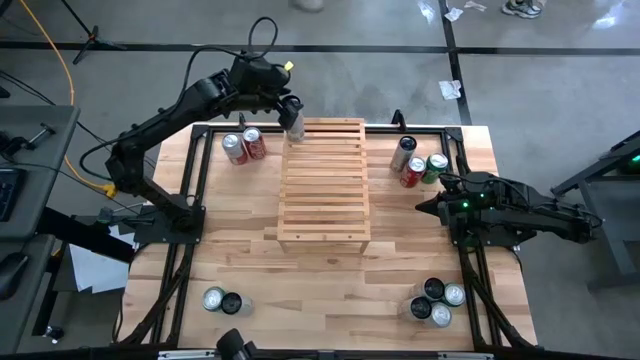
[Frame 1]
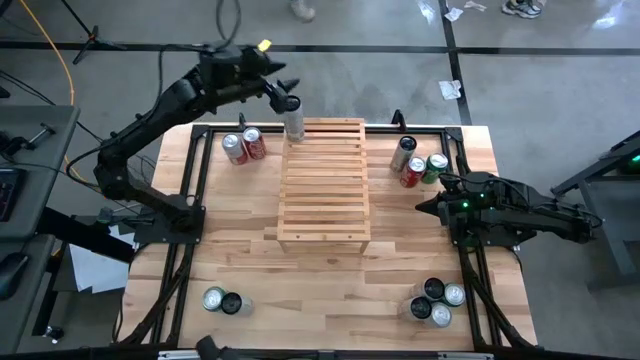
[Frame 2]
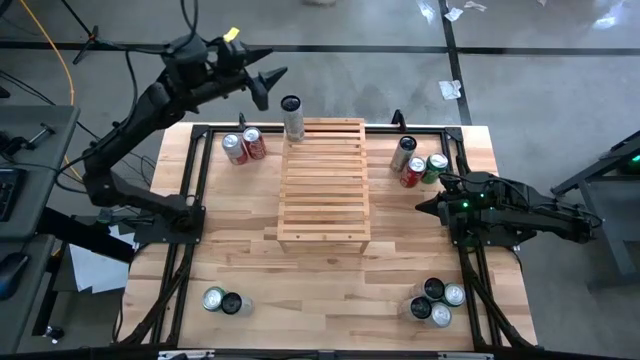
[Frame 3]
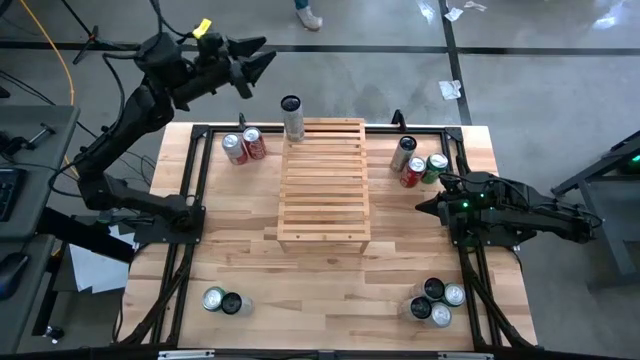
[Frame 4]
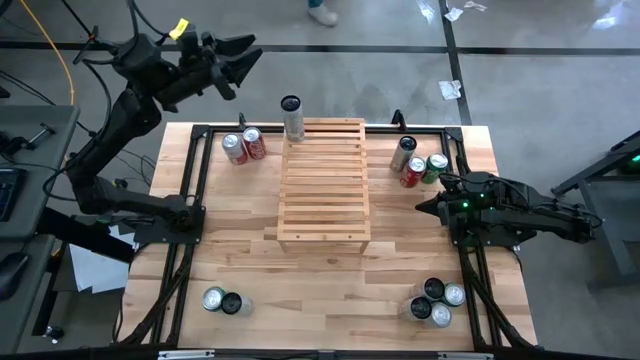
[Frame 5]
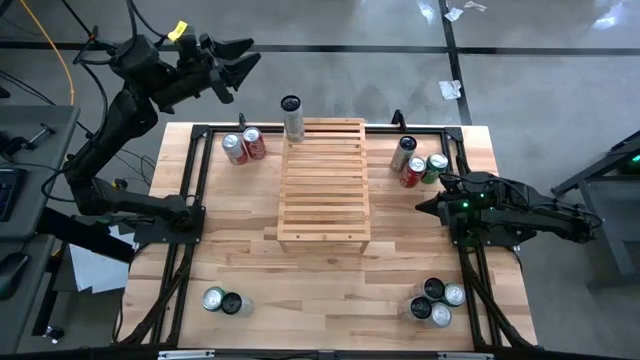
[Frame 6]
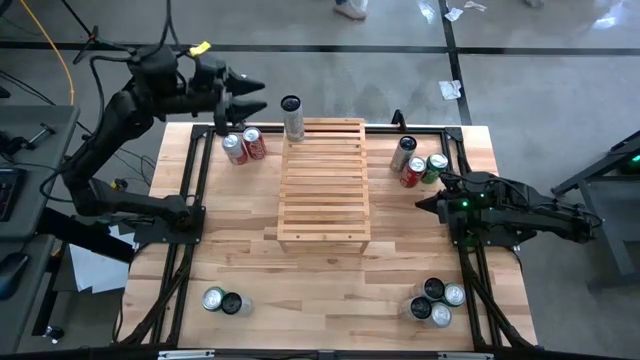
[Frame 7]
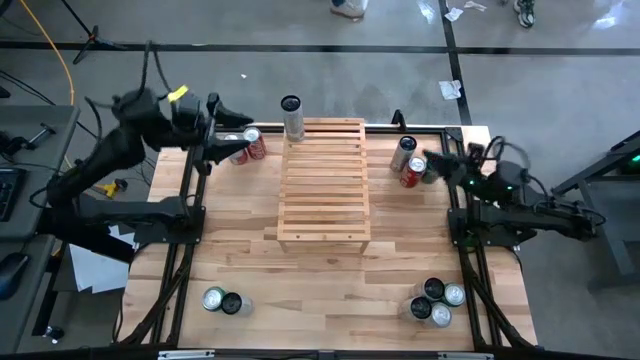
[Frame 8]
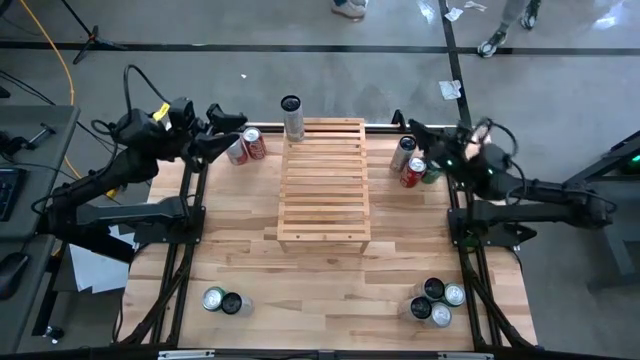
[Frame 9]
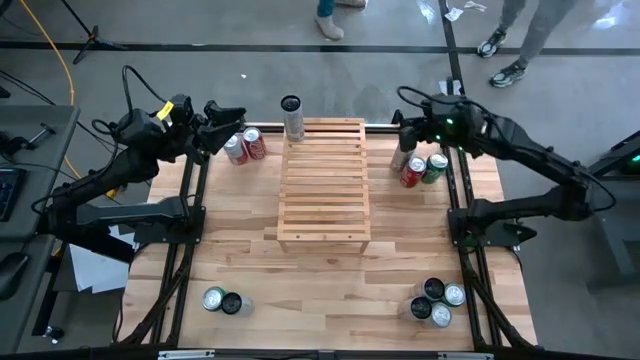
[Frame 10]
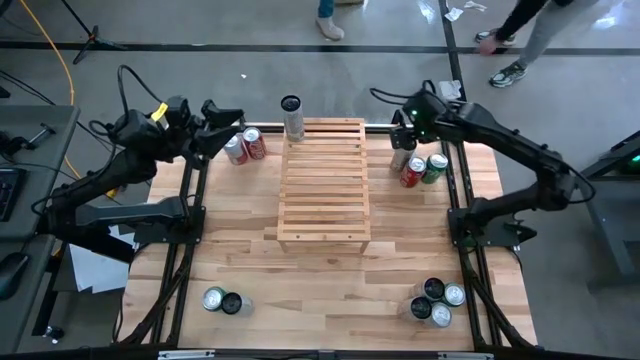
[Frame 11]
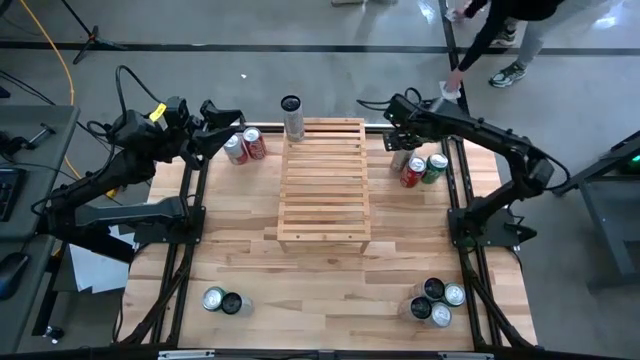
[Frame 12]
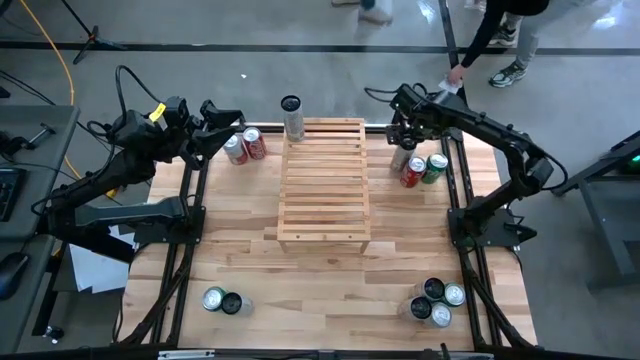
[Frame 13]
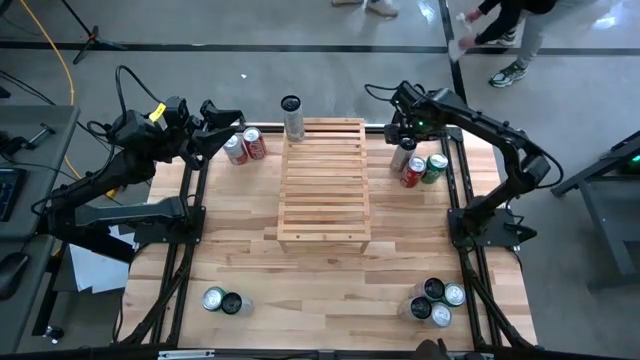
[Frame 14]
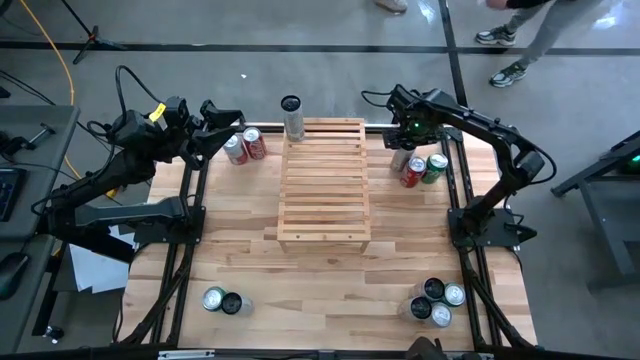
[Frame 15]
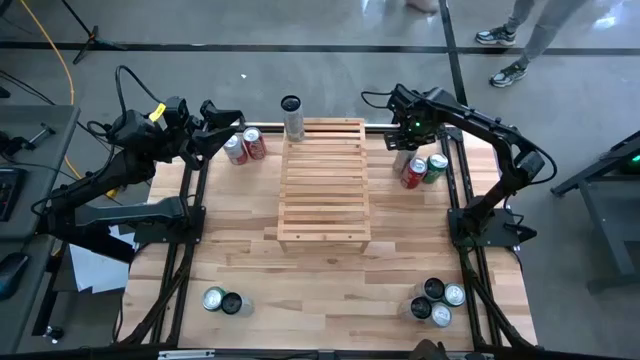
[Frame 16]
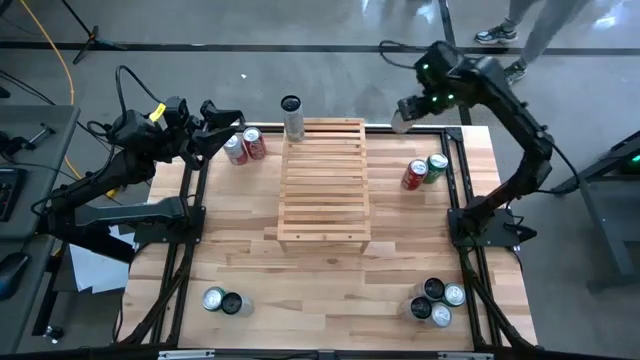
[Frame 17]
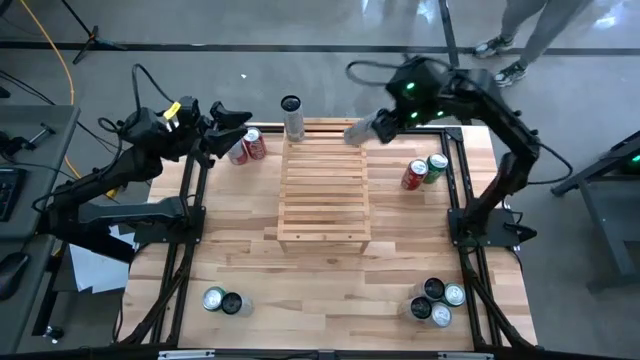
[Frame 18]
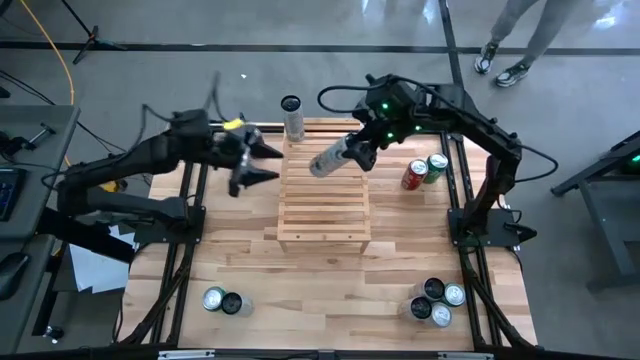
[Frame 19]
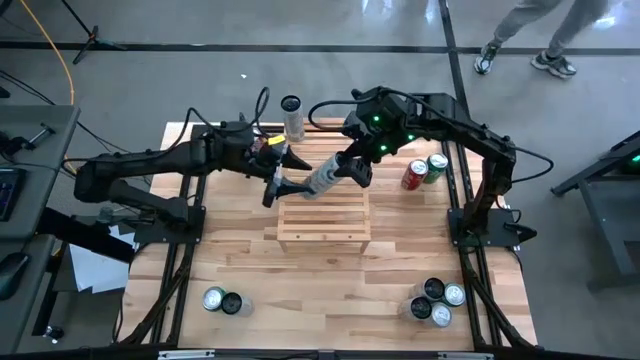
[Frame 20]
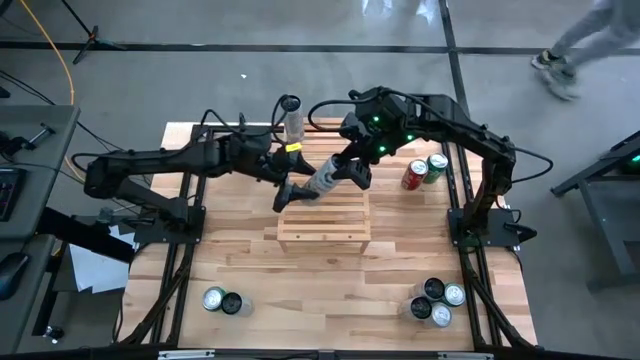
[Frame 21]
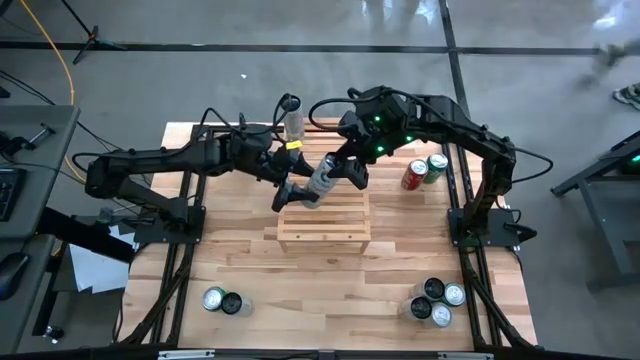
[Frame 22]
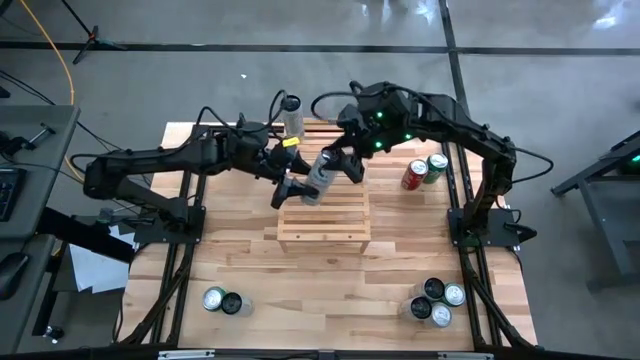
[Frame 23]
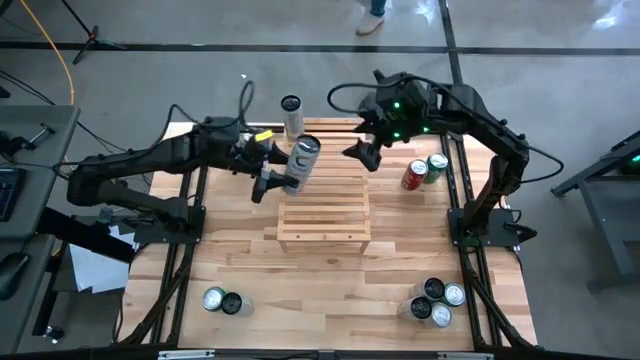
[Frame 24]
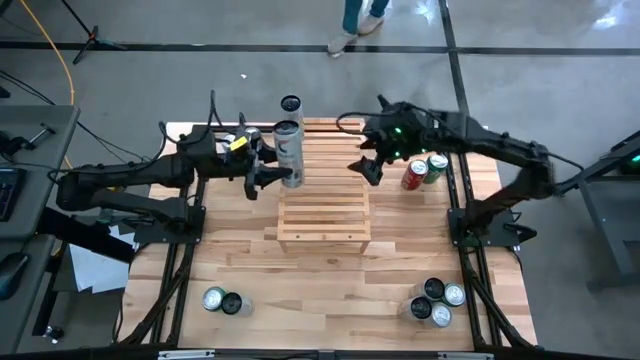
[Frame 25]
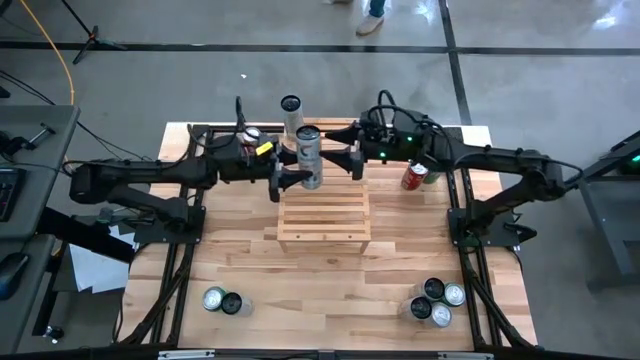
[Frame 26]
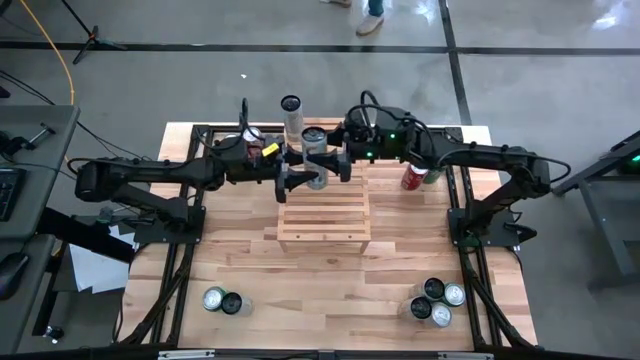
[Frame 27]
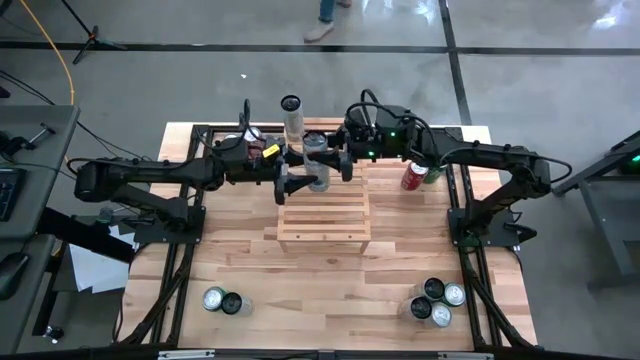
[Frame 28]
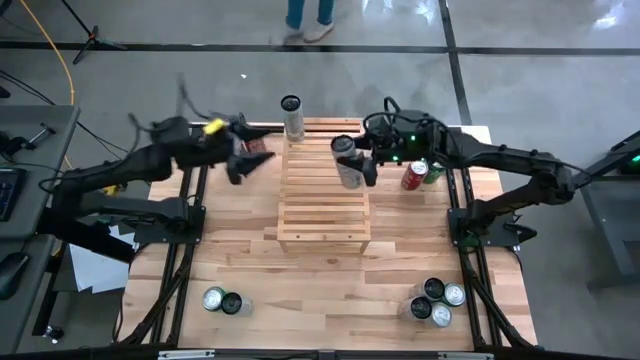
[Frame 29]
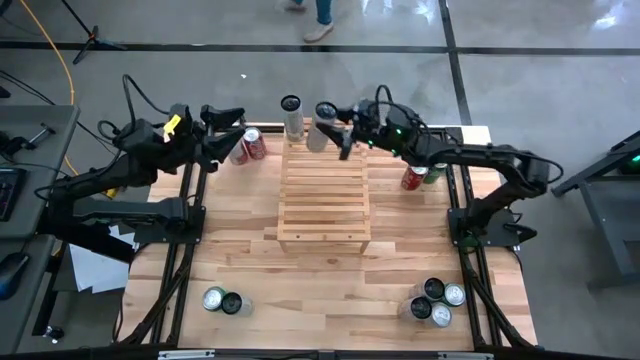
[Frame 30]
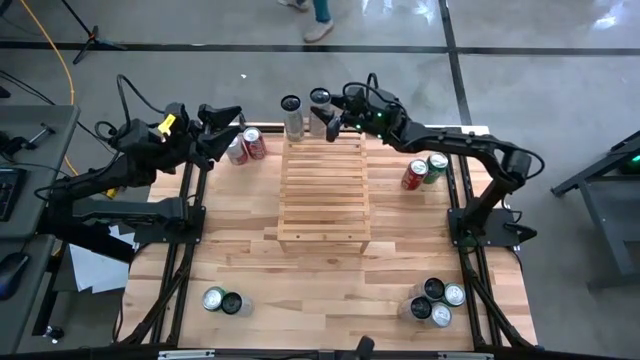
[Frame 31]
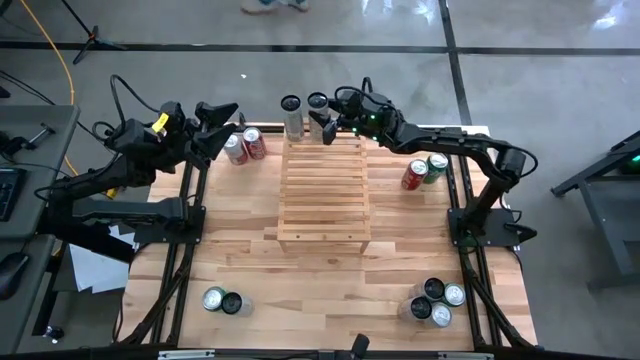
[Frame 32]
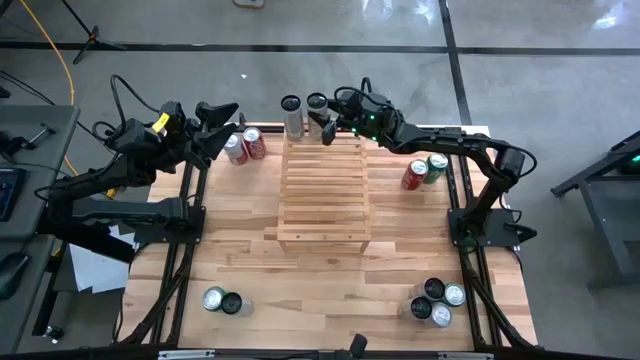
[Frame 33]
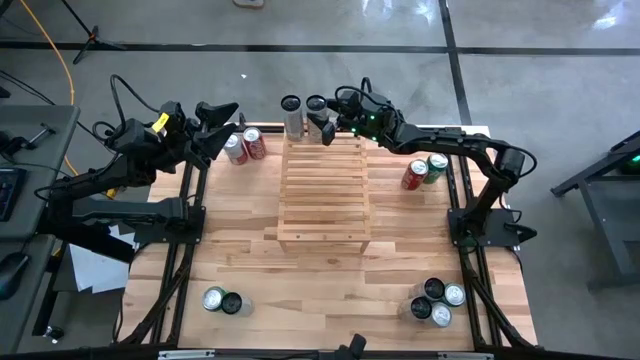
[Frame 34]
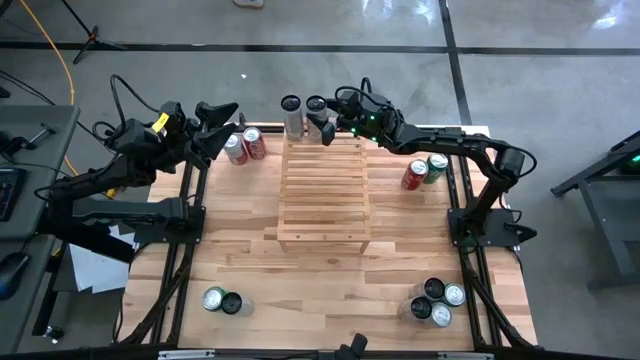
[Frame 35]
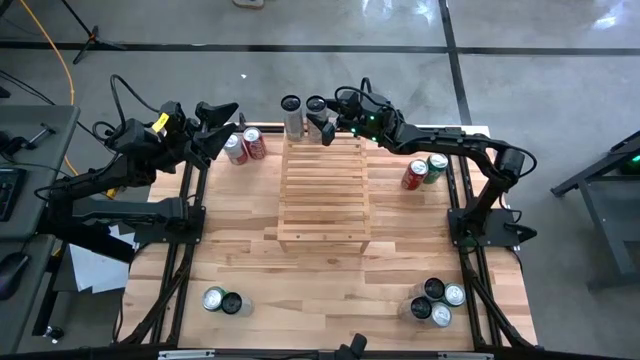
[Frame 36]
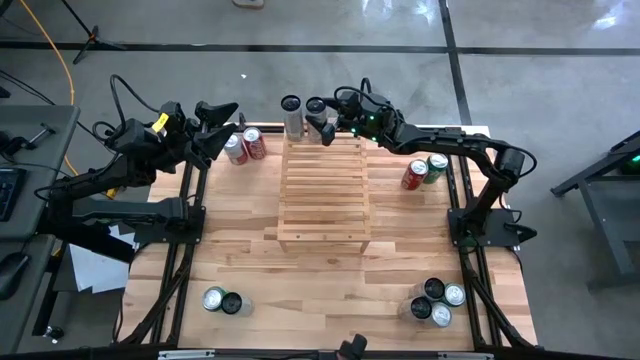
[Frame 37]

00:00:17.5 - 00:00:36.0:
Task: Place canned beverage on shelf
Put the white yellow soda on the shelf aligned with the other white yellow soda can

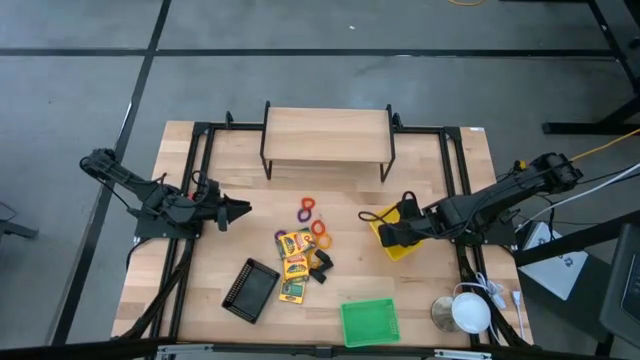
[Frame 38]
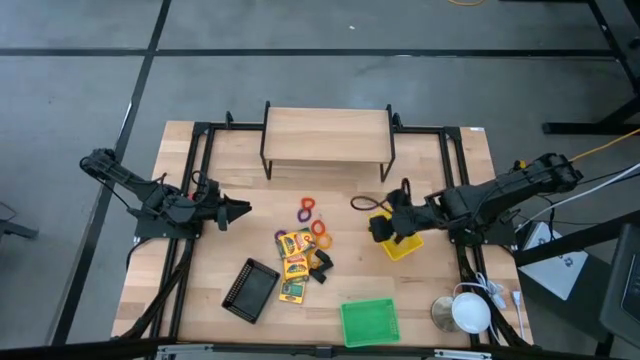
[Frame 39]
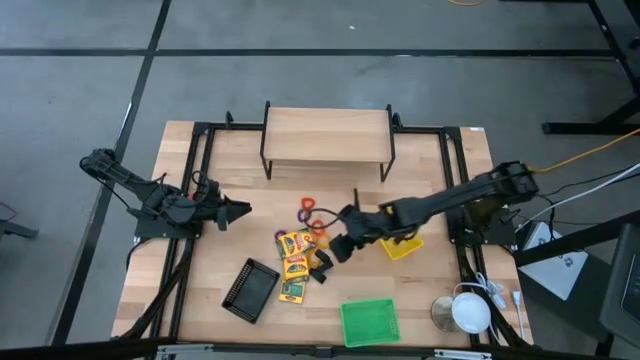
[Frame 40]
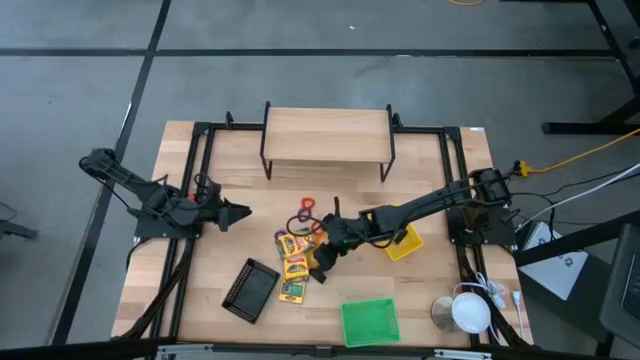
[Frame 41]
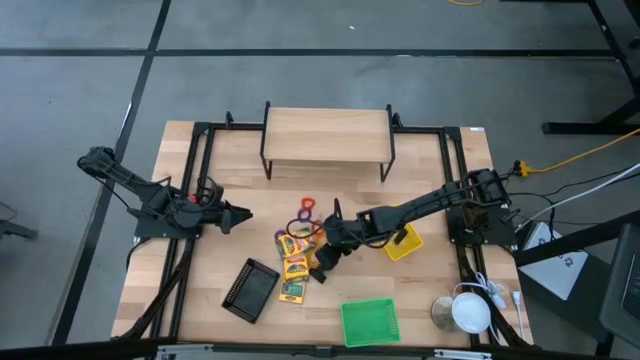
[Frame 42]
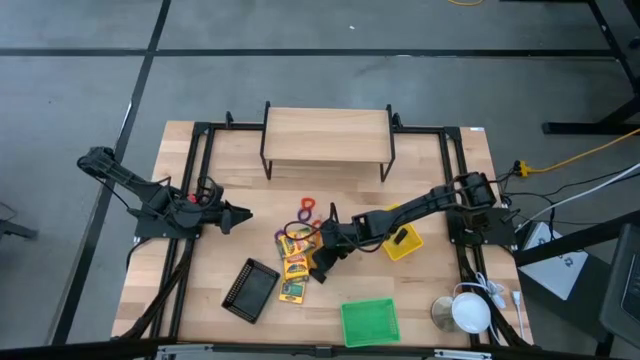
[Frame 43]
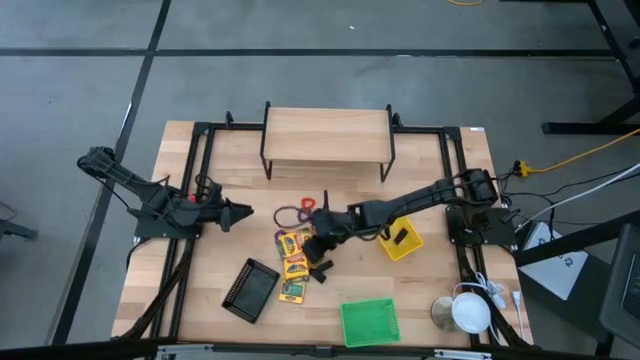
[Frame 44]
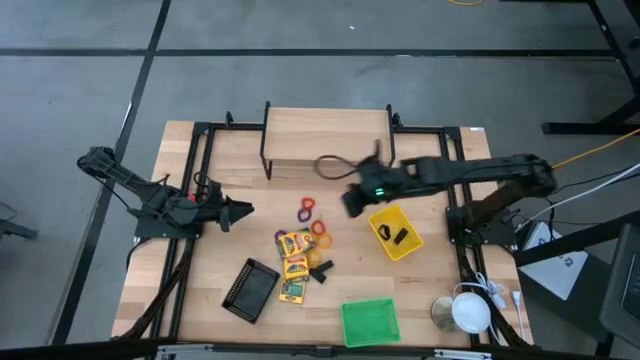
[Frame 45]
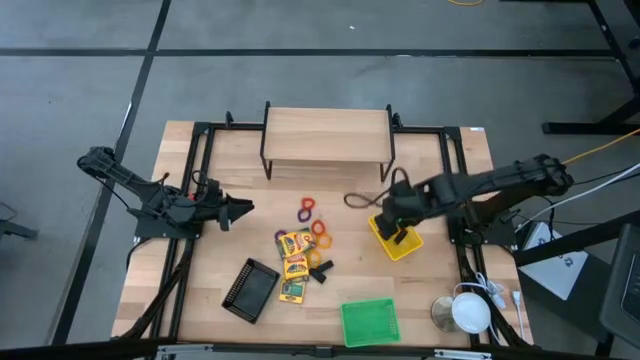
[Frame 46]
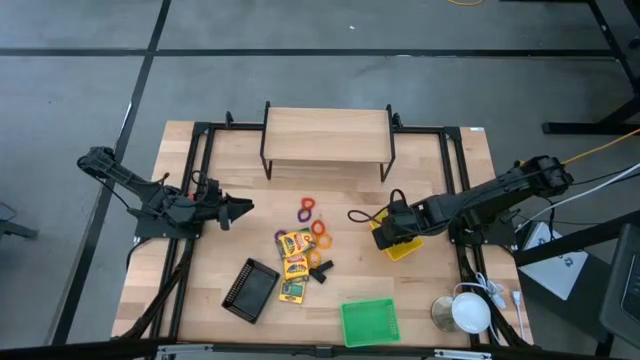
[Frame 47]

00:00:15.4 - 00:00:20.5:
Task: Pick & Place Office Desk Supplies
Put the black rubber band into the yellow basket
